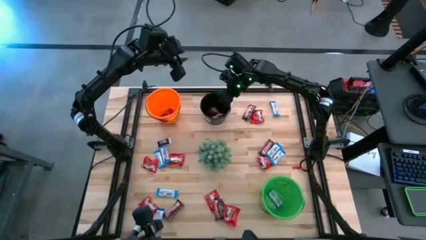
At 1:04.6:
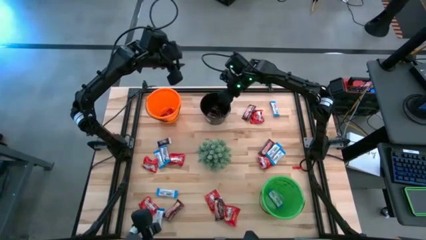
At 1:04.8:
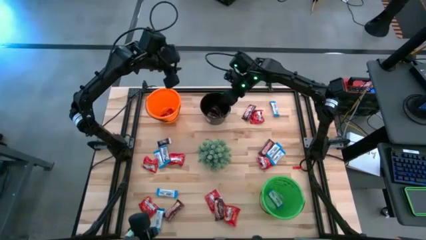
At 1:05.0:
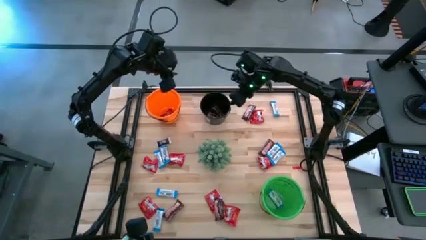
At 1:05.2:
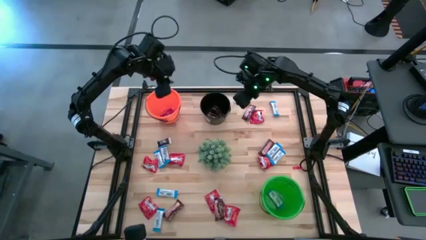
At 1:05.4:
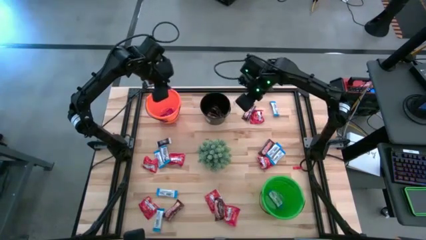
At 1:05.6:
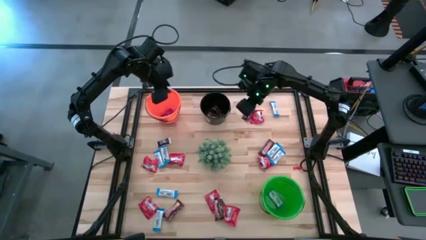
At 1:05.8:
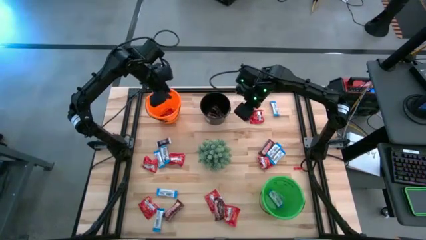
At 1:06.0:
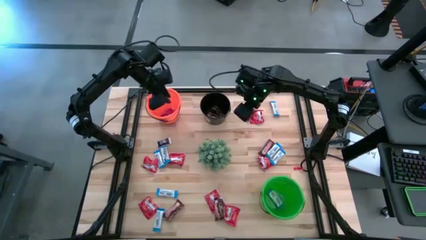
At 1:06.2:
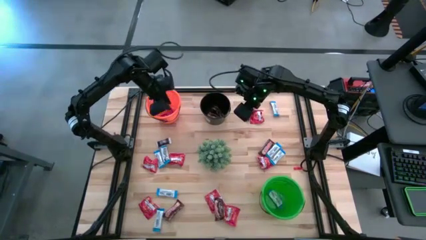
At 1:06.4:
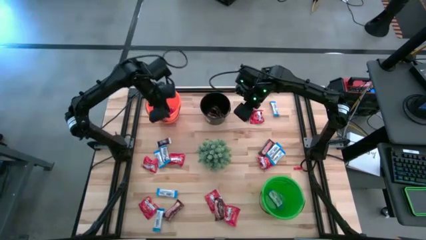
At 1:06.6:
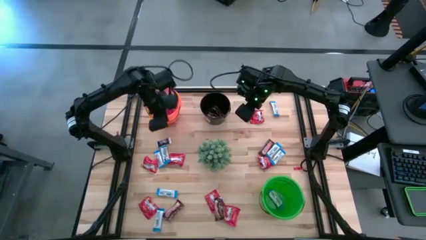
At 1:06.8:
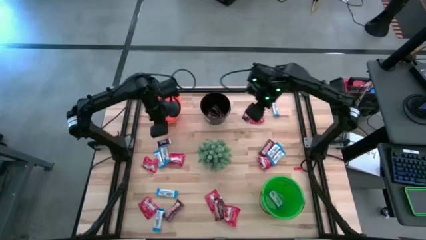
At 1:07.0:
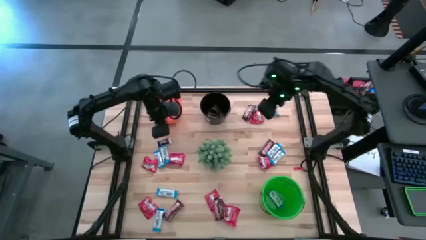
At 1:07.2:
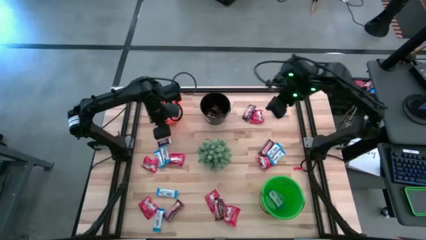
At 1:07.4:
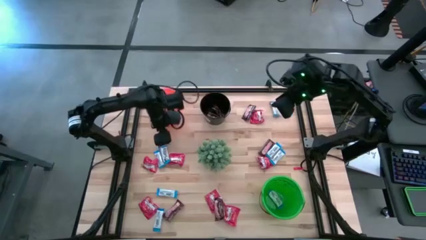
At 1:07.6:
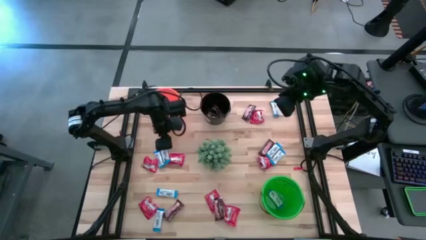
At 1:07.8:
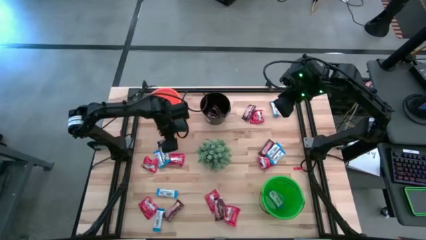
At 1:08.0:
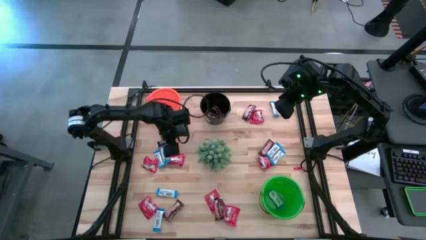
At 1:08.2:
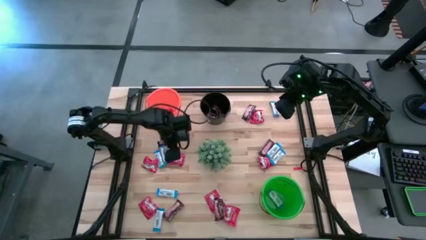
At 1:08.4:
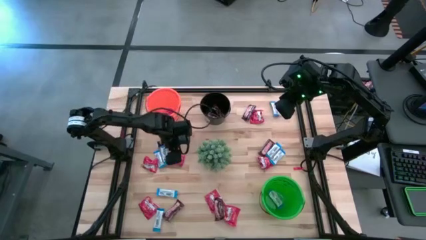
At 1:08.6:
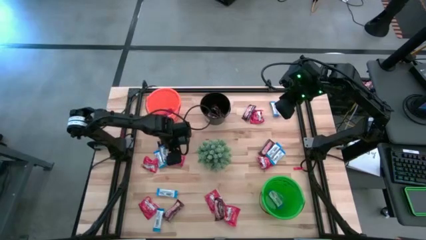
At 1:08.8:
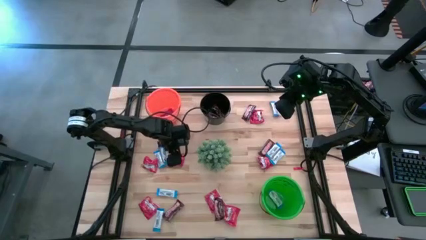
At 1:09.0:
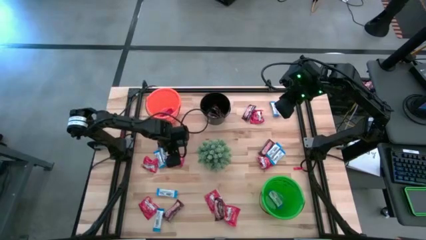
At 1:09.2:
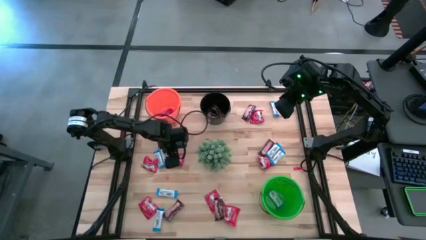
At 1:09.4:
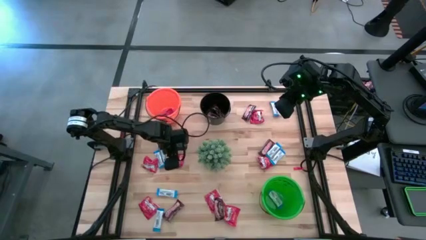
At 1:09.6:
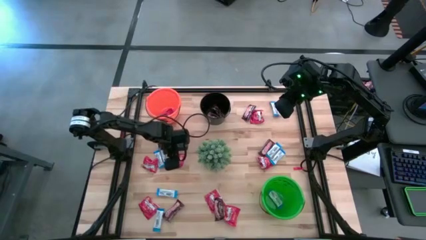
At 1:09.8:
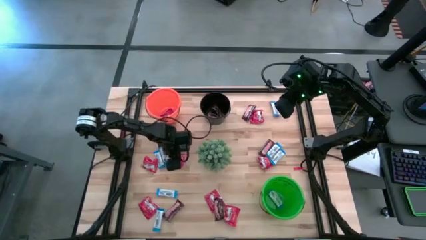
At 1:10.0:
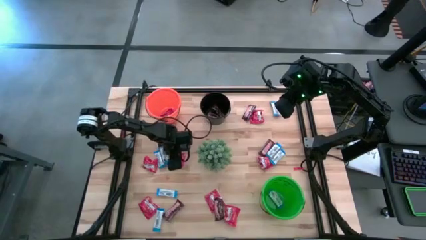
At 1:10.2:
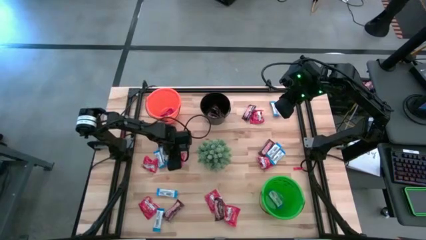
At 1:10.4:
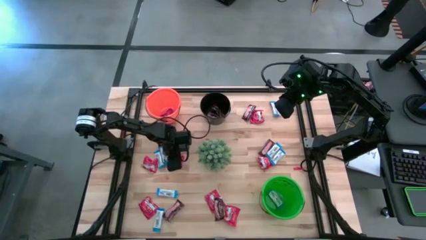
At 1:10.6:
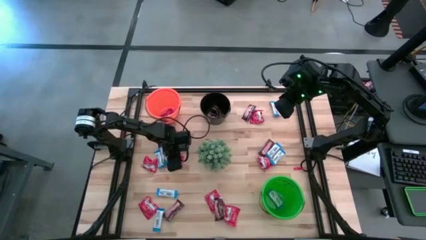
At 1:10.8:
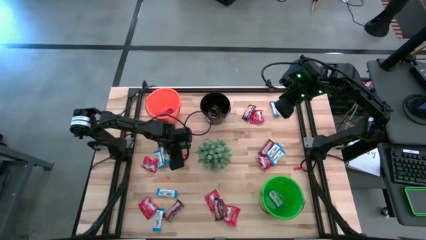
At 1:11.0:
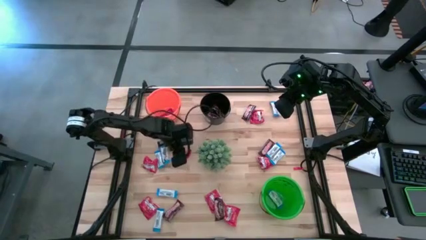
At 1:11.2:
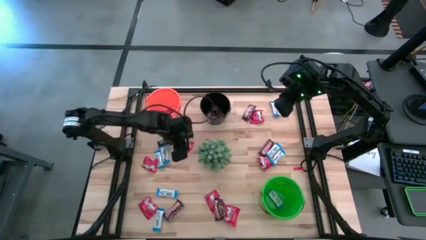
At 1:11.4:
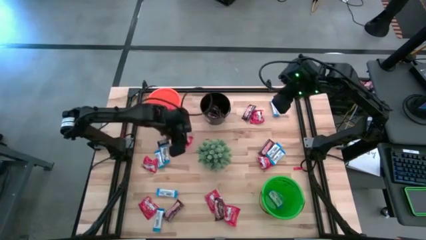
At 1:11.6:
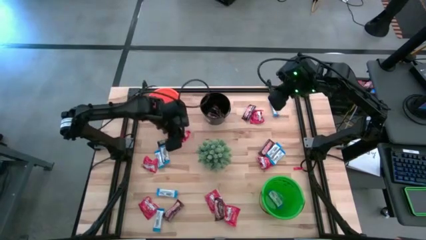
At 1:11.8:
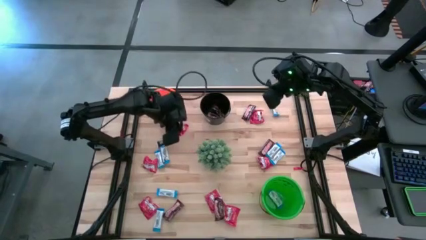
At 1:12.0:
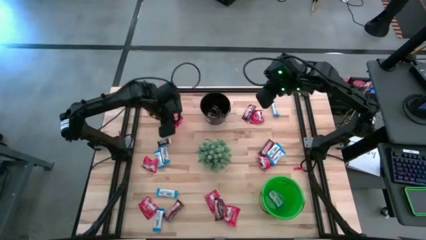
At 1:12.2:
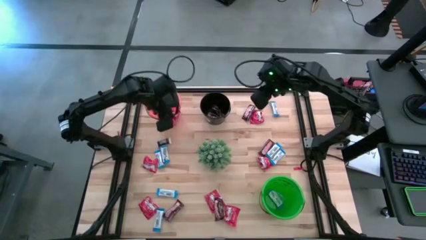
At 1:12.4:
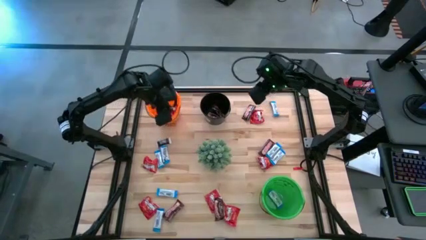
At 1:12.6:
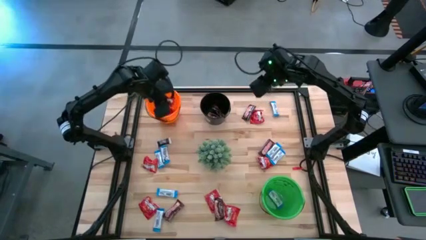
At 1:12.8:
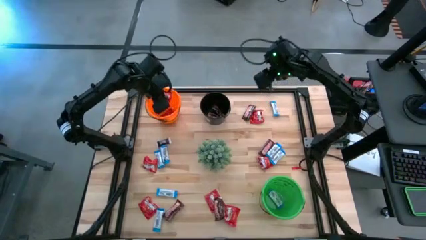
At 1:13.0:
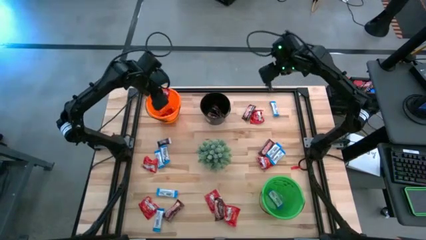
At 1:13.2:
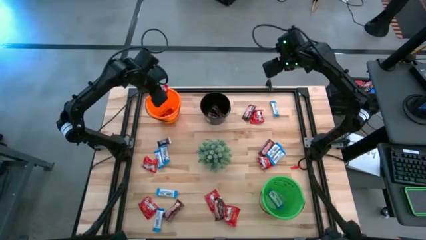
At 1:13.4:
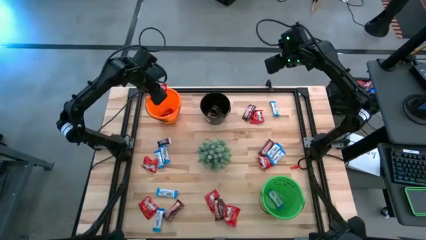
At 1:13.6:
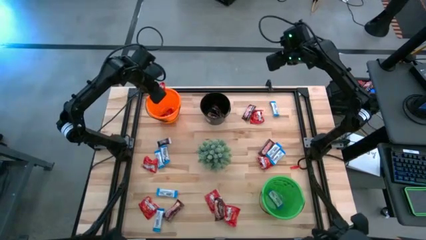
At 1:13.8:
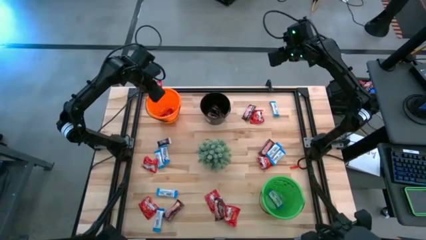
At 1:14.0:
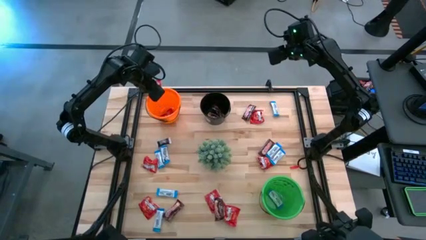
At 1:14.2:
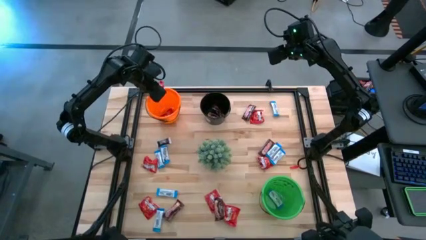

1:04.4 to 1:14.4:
Task: Sort candy
Put the red candy into the orange bucket

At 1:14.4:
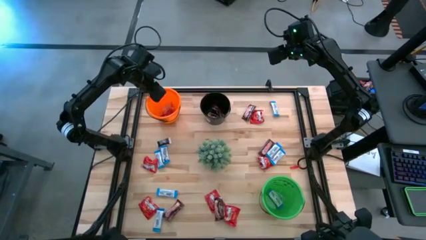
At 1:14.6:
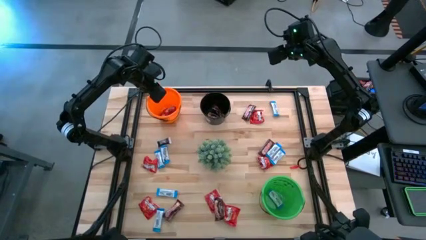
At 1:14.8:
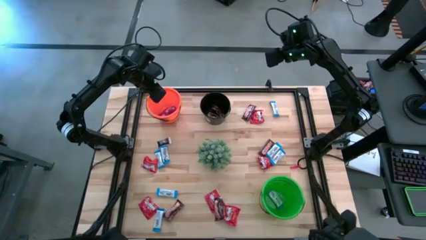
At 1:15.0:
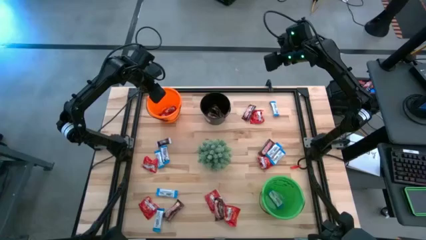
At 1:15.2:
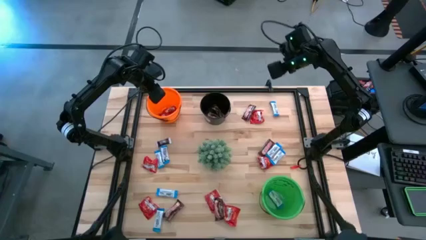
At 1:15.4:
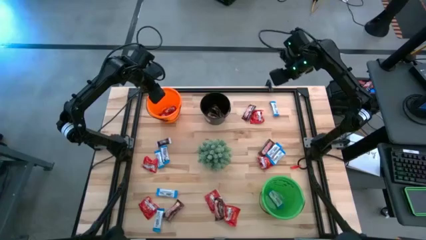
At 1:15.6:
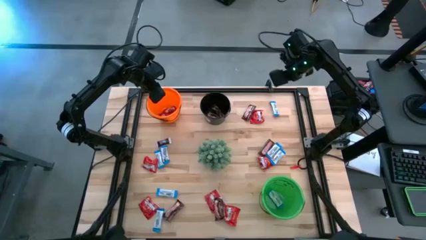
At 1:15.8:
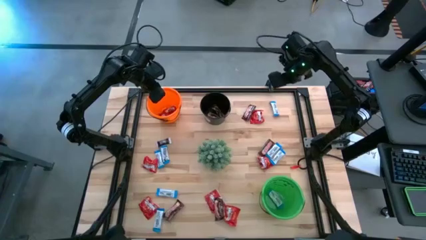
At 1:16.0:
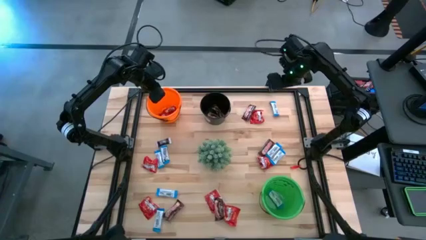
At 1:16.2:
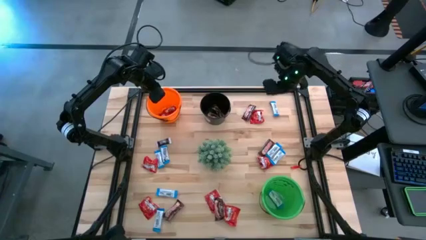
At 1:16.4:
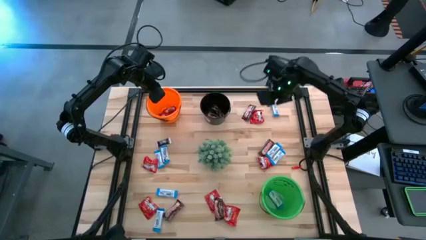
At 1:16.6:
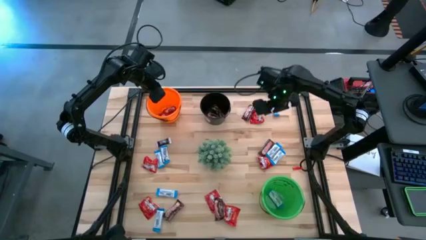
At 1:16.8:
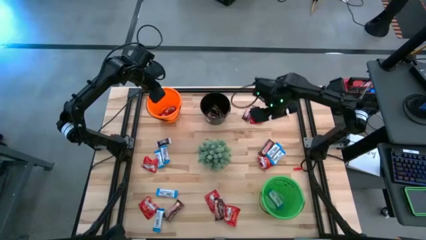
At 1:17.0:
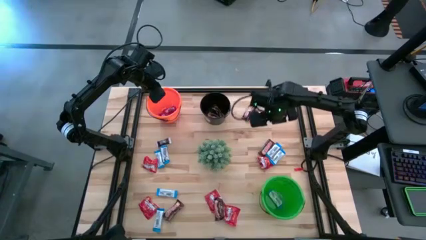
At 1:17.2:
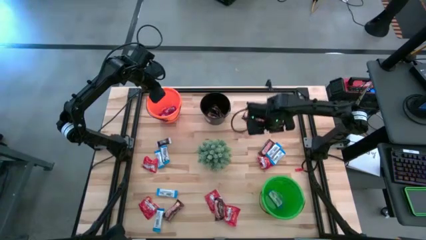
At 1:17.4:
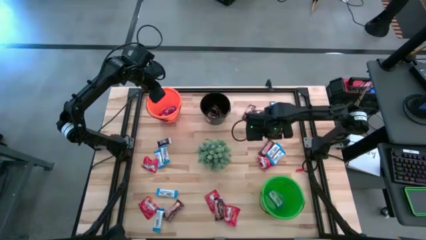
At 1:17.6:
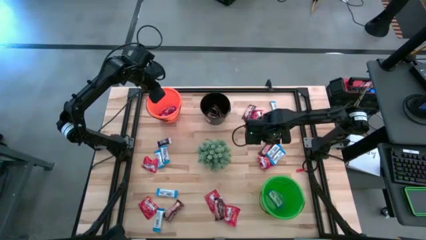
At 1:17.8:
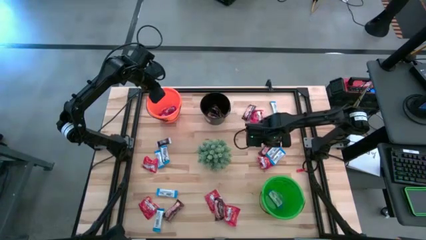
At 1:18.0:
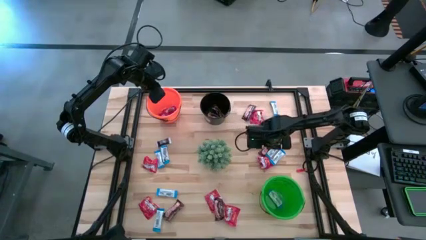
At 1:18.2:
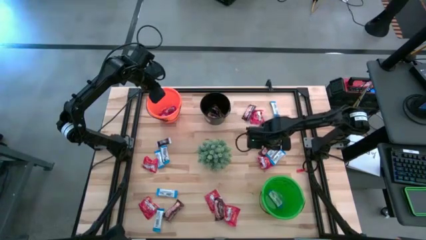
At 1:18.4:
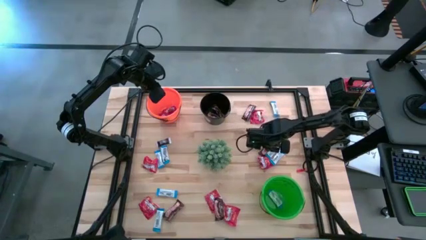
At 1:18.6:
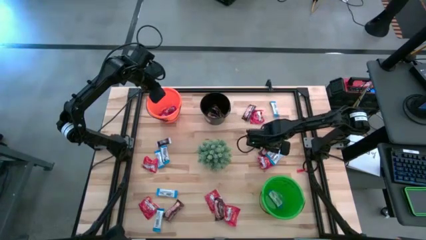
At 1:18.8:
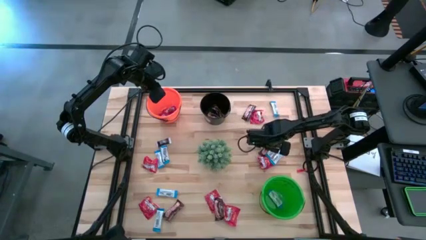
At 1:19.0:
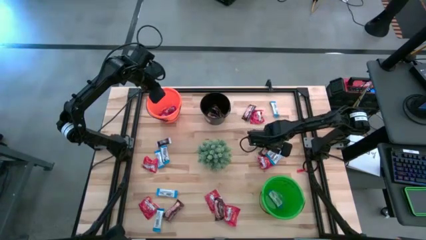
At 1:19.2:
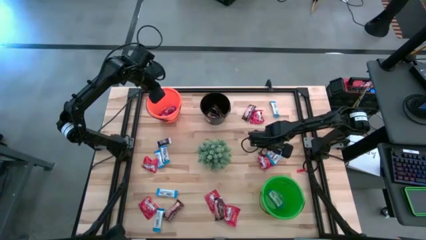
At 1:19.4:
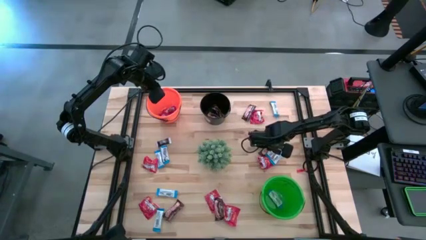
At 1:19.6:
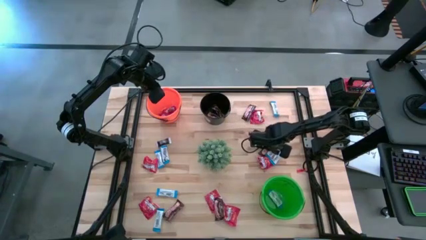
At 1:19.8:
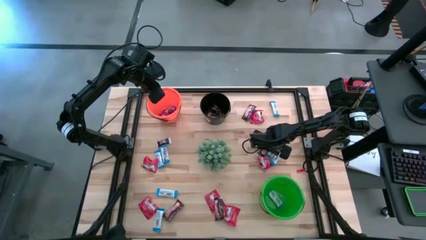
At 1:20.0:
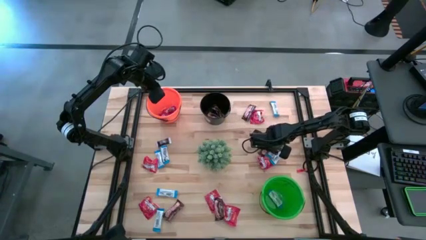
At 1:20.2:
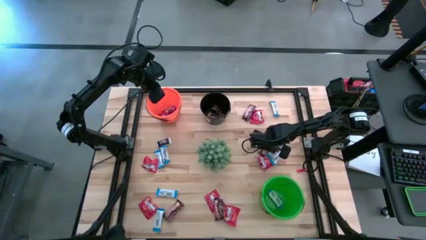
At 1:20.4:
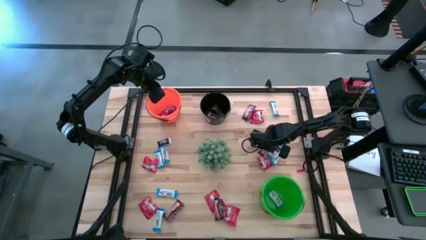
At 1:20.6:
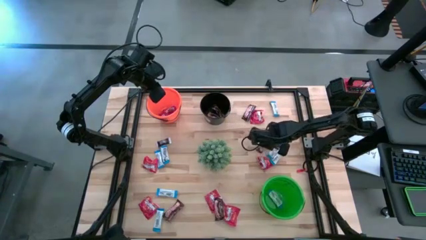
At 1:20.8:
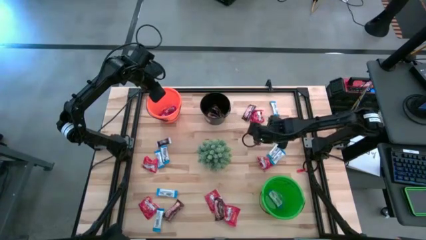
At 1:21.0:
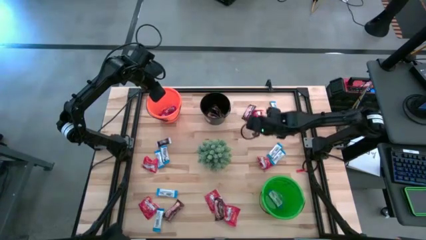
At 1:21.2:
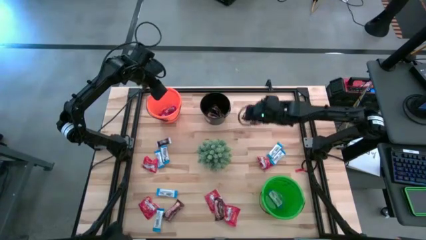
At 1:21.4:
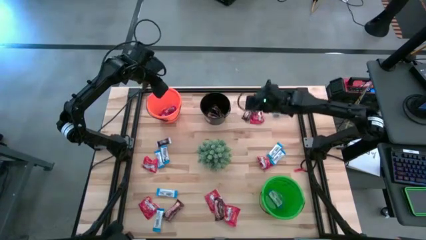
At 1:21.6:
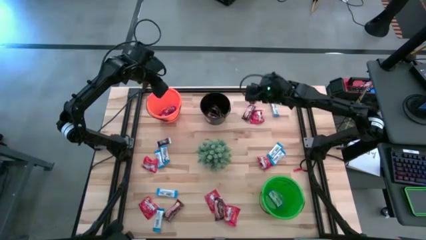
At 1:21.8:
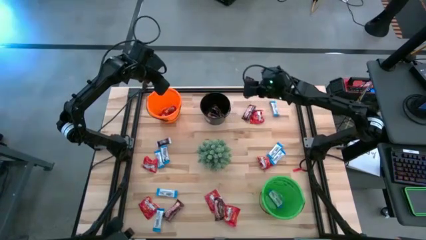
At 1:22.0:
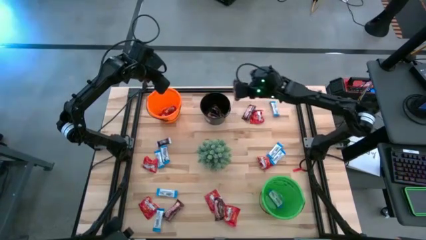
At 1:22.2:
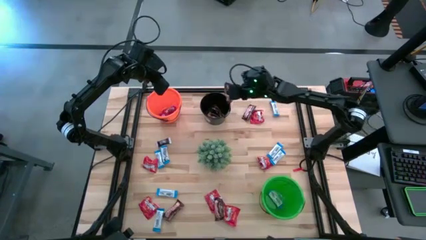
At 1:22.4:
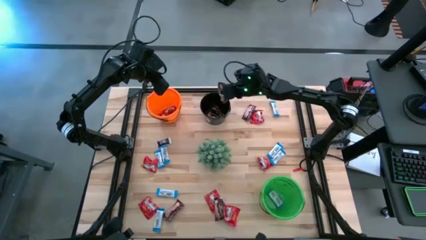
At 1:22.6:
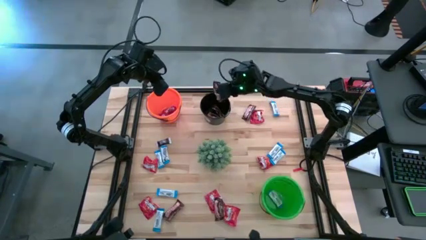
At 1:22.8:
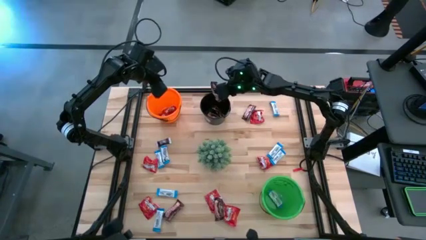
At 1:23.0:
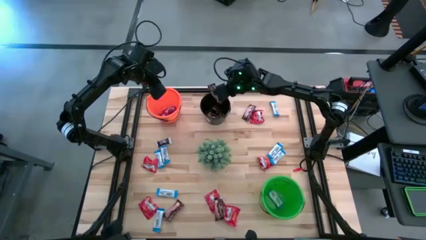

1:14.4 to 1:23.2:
Put the brown chocolate into the black bucket
